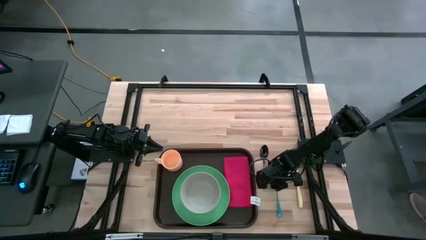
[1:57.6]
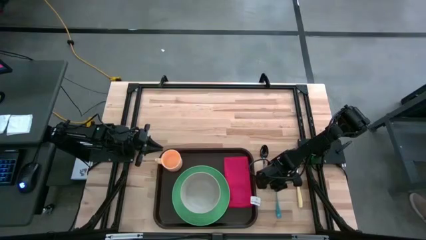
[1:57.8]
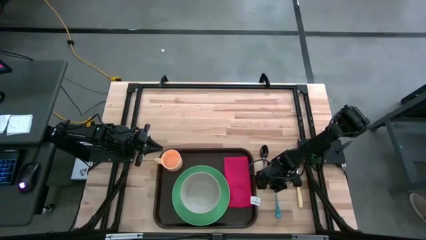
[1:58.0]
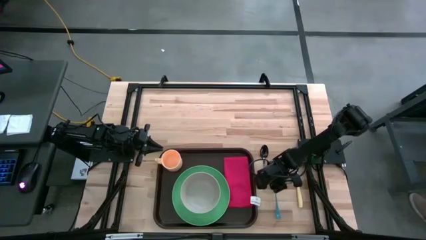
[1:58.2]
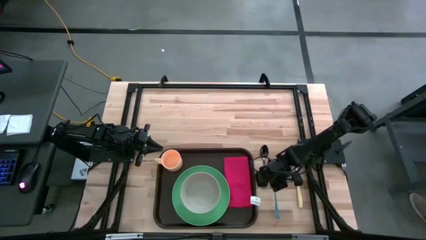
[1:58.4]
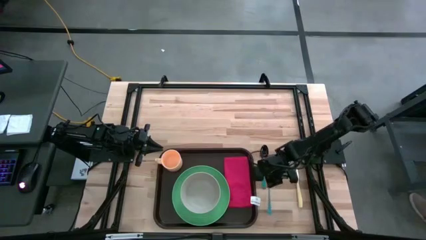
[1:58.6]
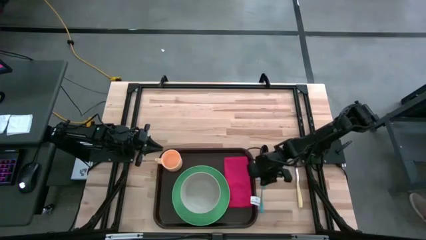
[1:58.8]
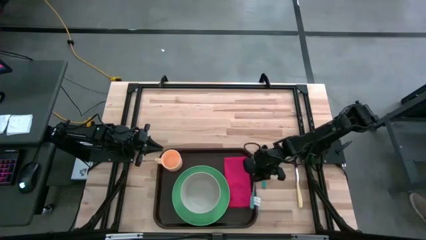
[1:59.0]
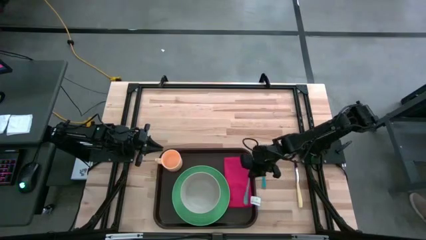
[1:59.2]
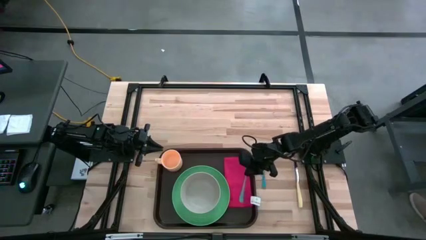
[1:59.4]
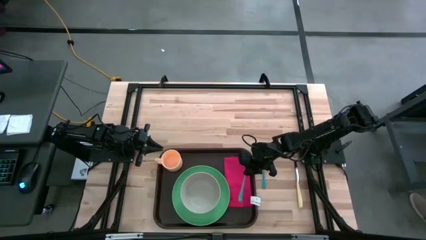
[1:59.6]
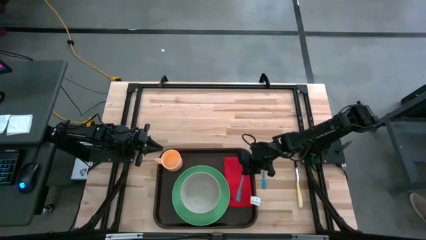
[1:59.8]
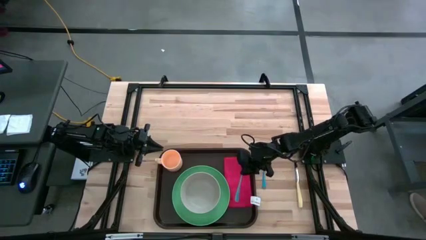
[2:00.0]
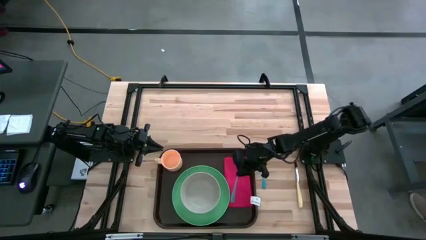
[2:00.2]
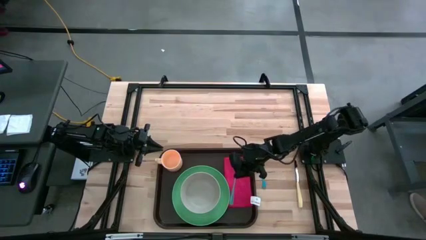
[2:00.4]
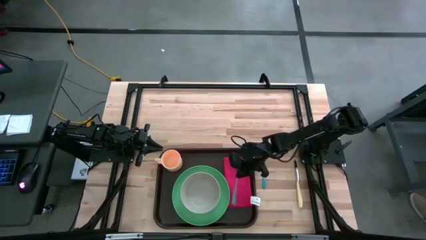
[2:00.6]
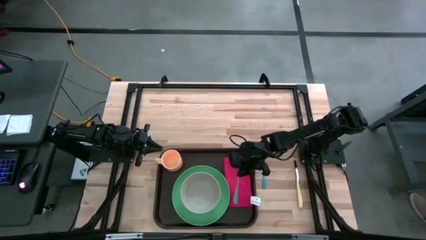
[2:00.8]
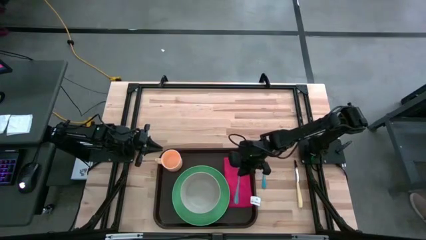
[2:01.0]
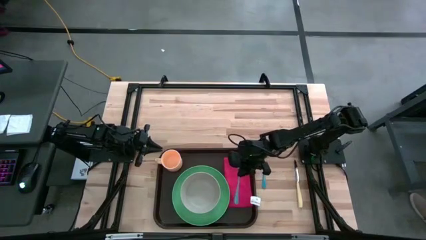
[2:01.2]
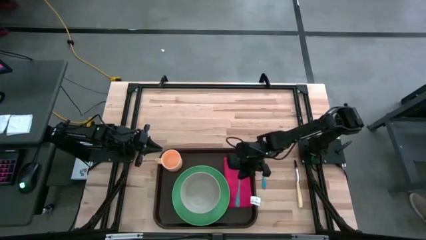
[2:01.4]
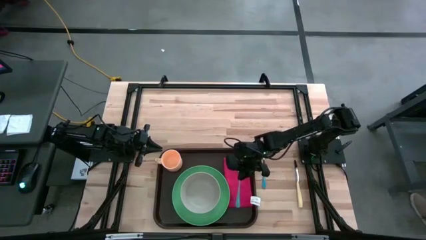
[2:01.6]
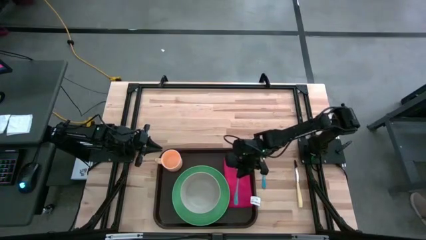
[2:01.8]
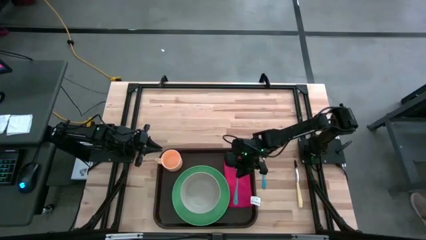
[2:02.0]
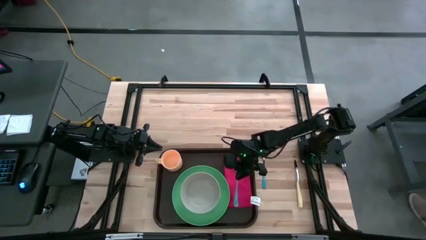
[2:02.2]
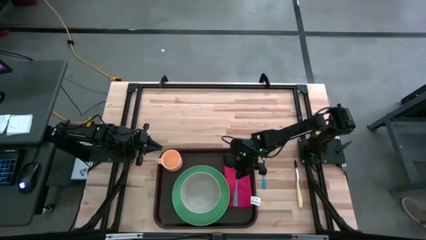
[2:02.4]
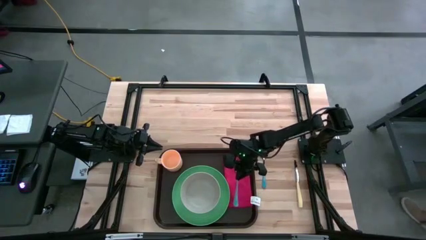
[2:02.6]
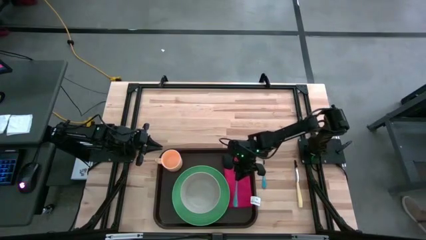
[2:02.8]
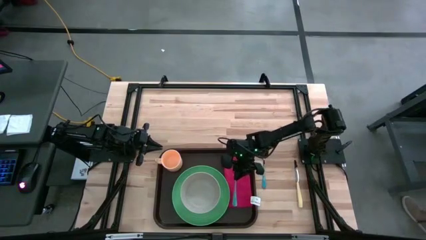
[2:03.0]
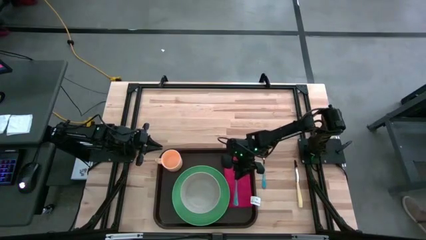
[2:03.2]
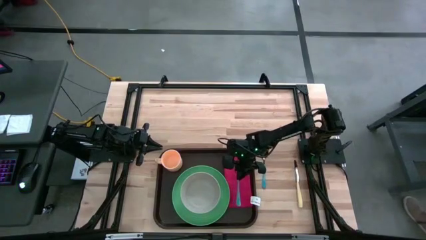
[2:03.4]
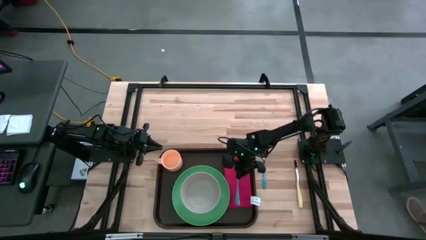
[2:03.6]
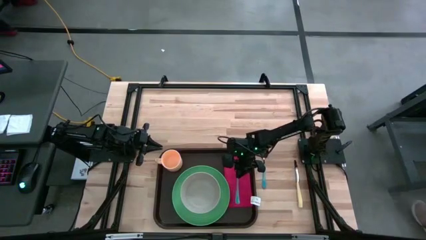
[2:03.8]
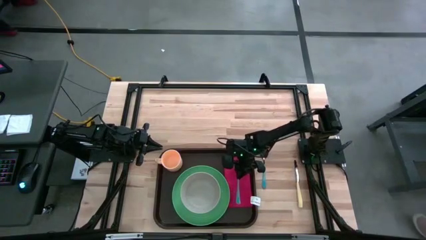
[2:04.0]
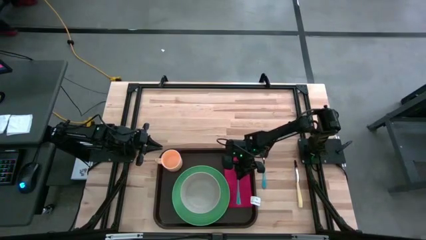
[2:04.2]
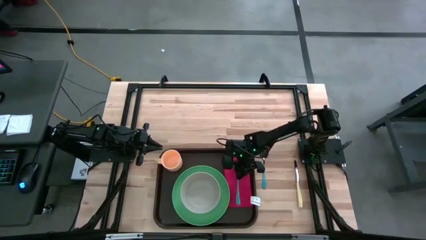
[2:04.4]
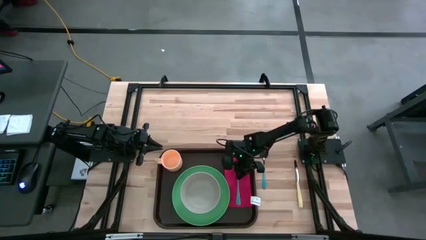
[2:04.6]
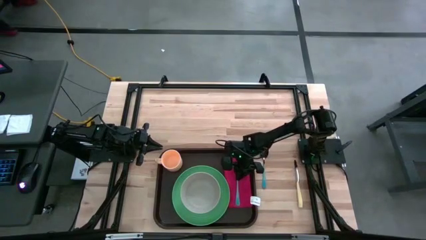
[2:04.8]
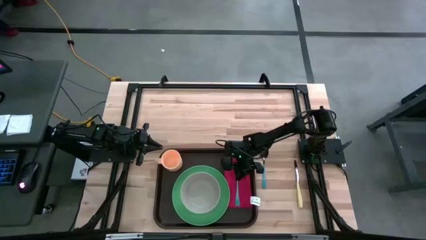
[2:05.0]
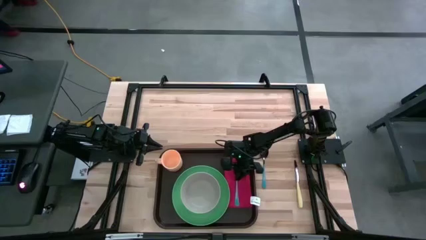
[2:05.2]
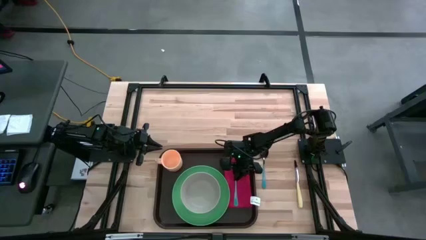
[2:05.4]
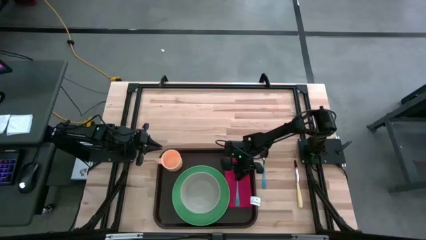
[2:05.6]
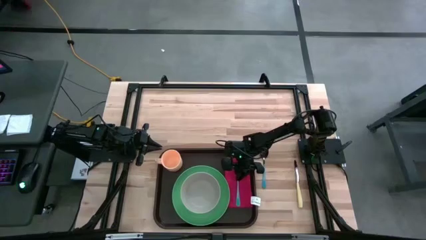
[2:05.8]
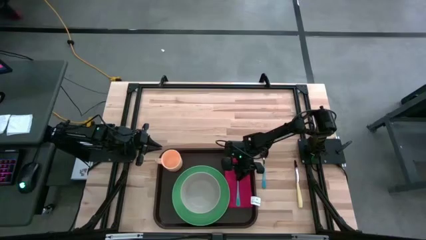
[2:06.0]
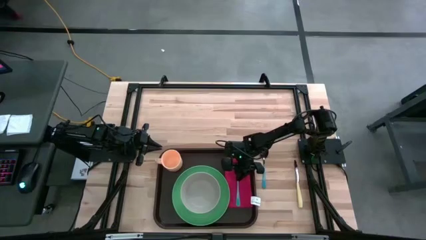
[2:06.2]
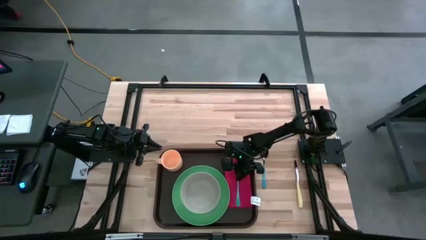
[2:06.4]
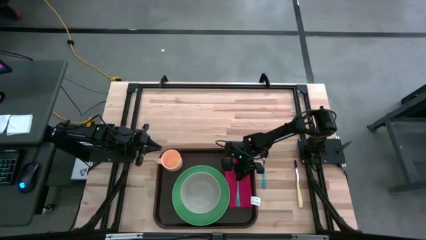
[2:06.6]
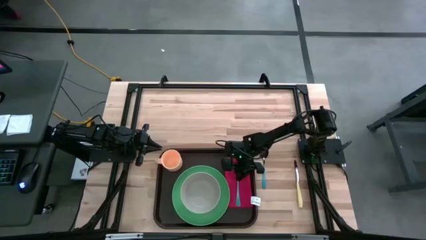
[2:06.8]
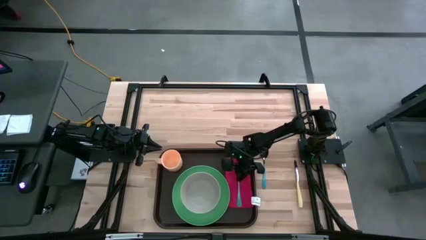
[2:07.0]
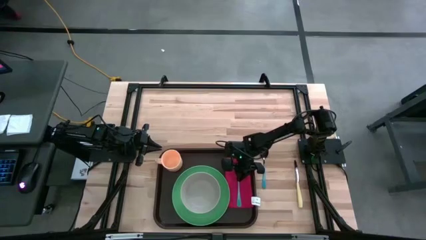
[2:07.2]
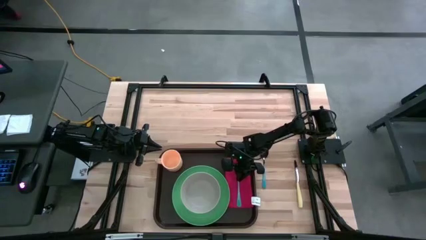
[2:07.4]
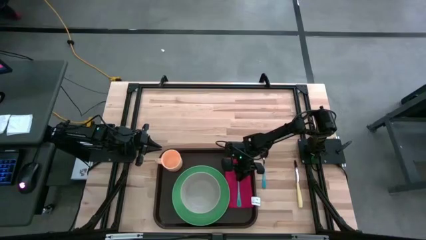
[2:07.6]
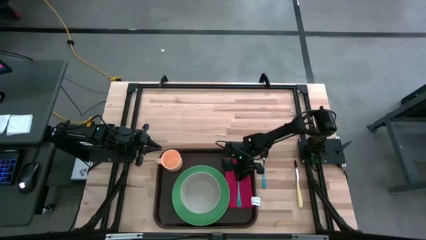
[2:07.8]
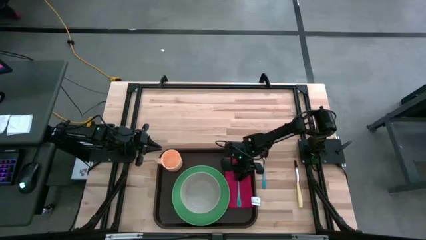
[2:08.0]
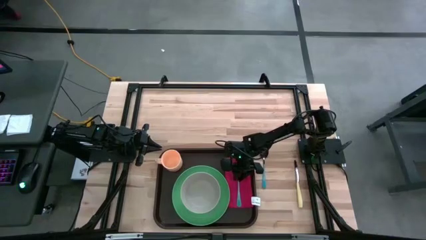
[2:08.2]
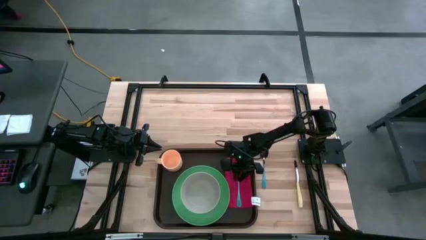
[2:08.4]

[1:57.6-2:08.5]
Task: Set up tray
Put the blue fork on top of the red table napkin

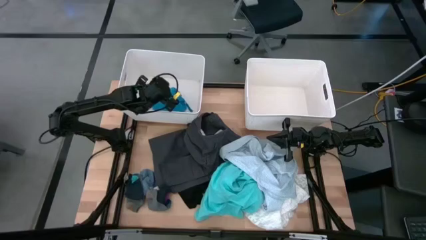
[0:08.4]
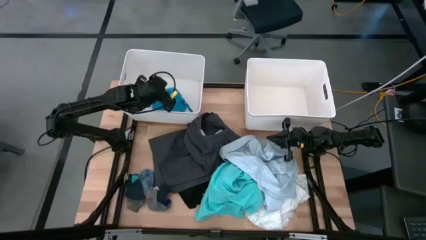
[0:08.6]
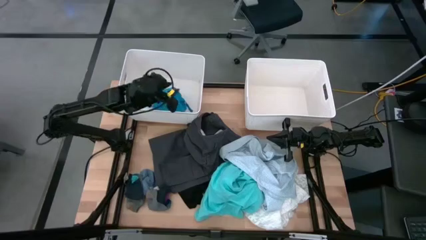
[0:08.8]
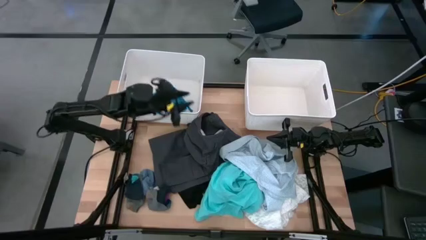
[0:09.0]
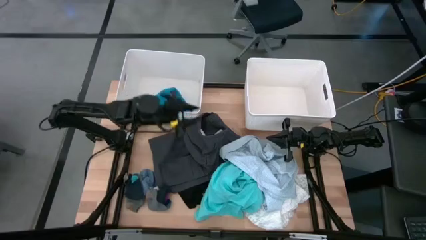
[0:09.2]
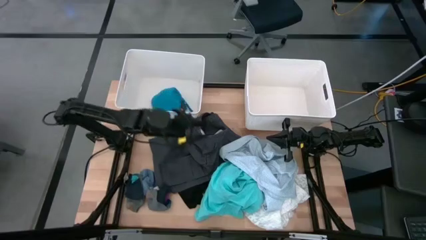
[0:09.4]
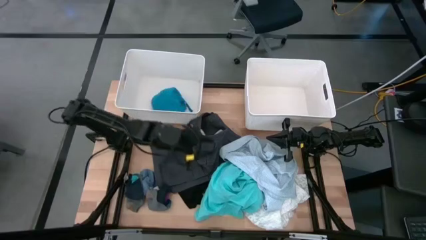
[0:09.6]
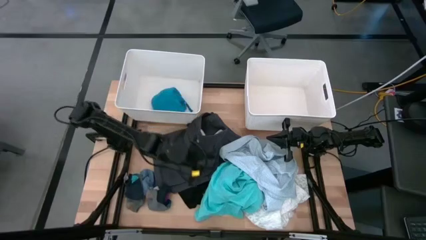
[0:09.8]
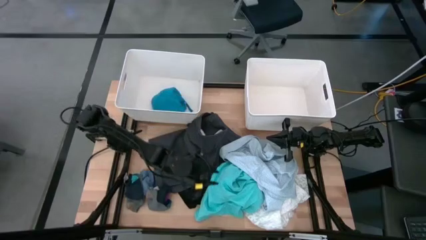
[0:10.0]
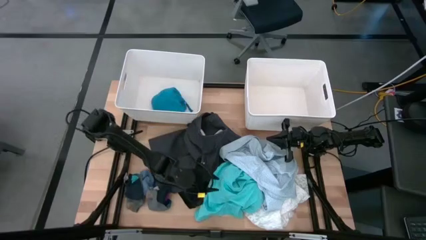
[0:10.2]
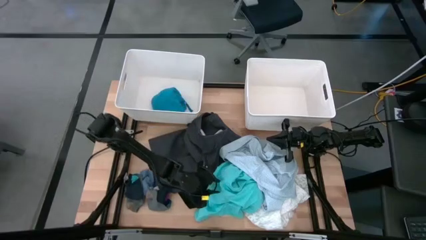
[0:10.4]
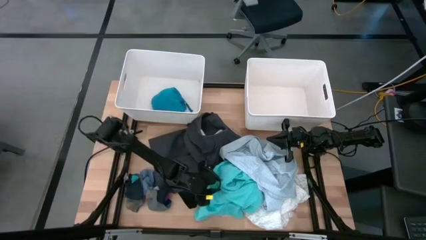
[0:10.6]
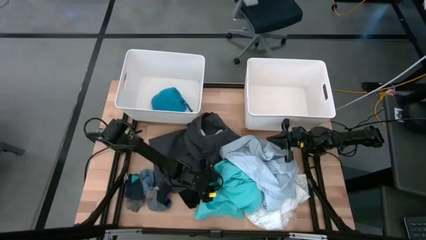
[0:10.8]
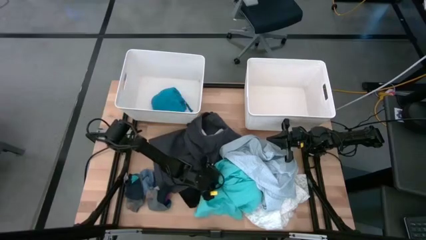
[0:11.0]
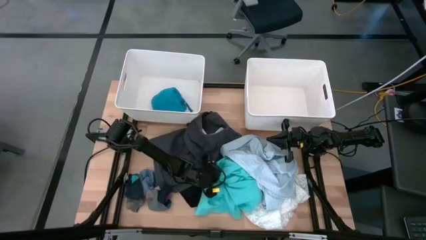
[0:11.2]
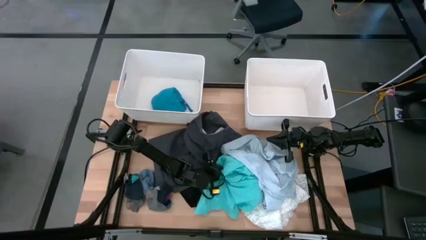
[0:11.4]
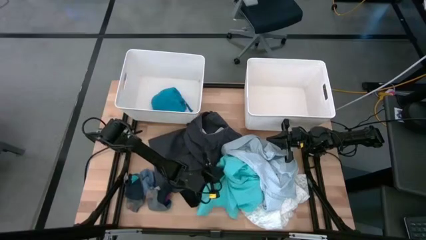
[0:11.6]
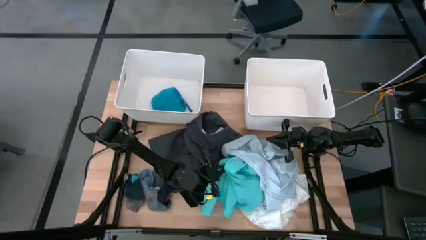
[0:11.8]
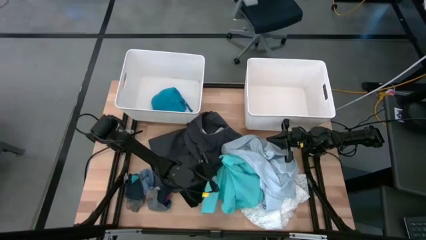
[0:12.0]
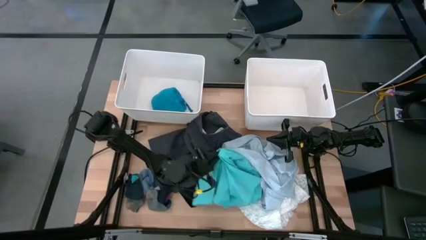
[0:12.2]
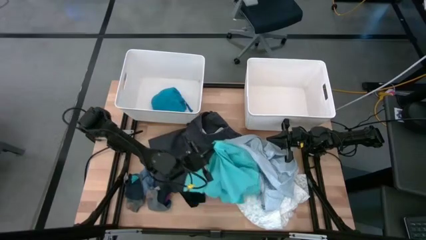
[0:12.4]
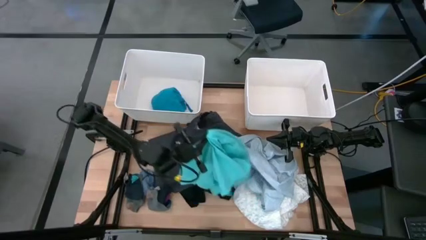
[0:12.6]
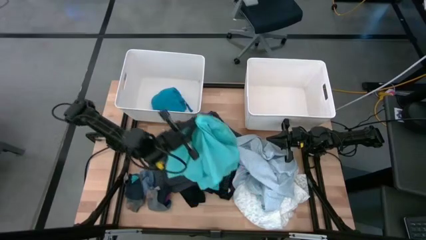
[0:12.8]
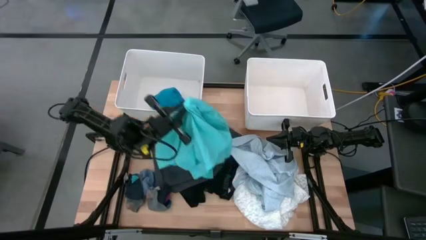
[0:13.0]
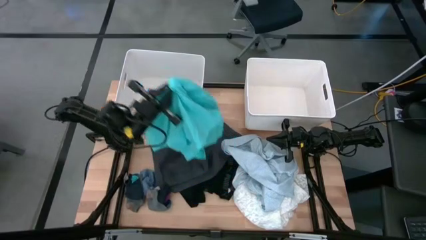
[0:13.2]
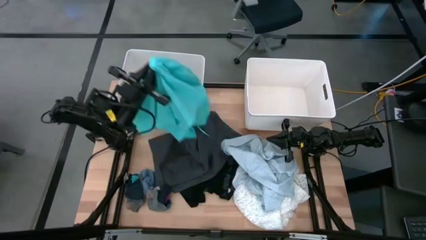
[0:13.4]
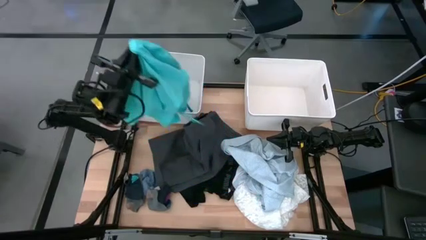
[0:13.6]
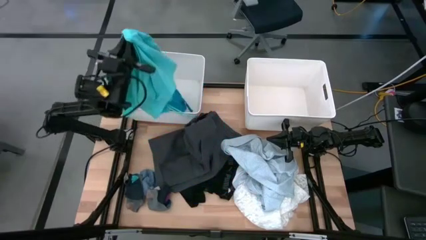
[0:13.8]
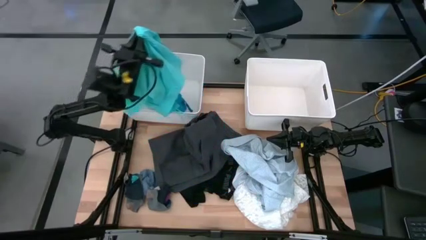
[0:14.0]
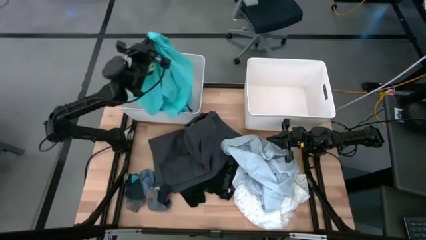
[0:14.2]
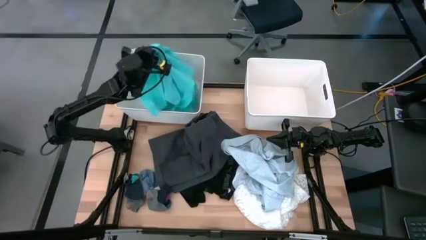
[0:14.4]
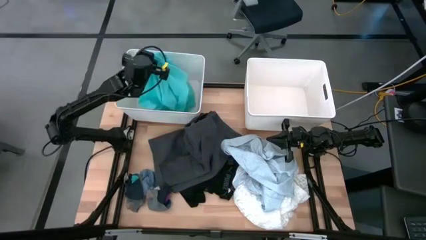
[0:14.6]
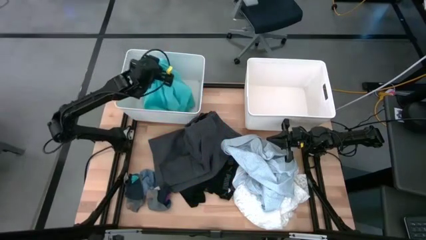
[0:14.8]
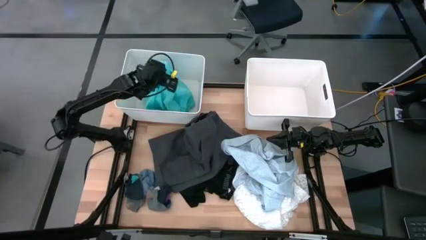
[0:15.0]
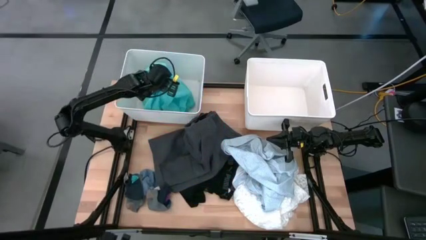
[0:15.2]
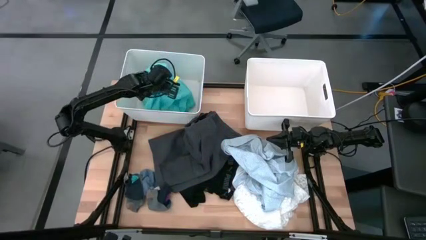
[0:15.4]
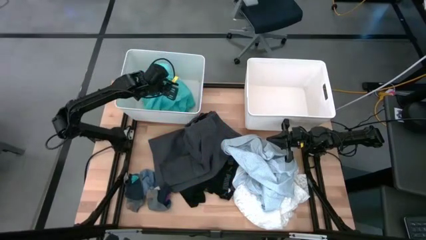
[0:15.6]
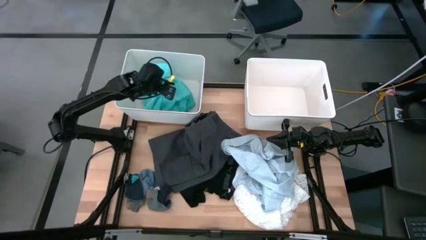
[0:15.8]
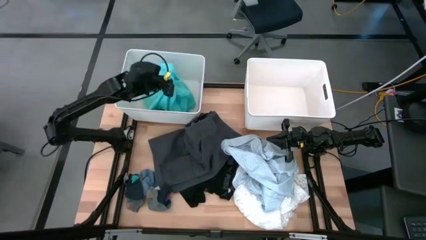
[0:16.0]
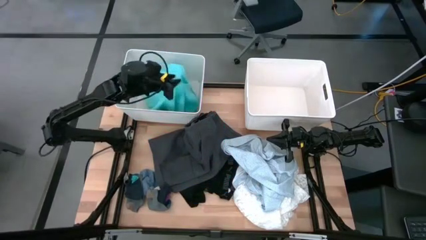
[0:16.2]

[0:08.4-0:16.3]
Task: Sort clothes
Put the light green shorts into the left white laundry bin
